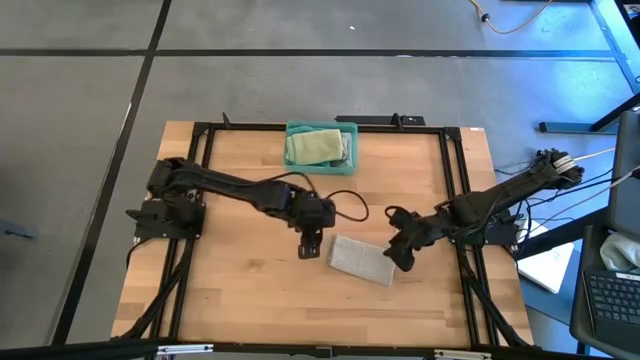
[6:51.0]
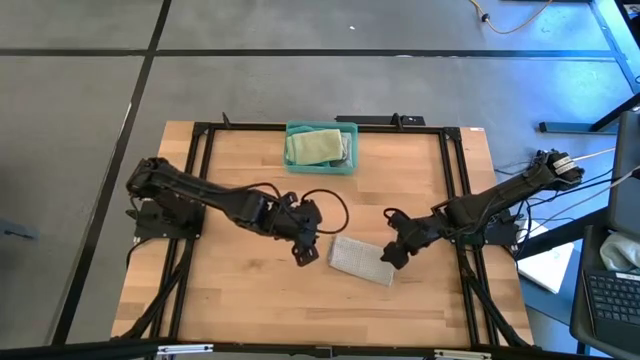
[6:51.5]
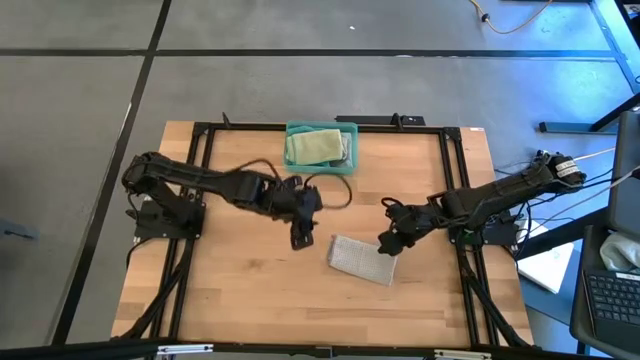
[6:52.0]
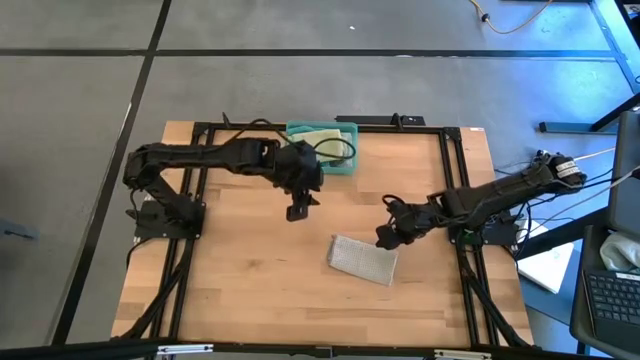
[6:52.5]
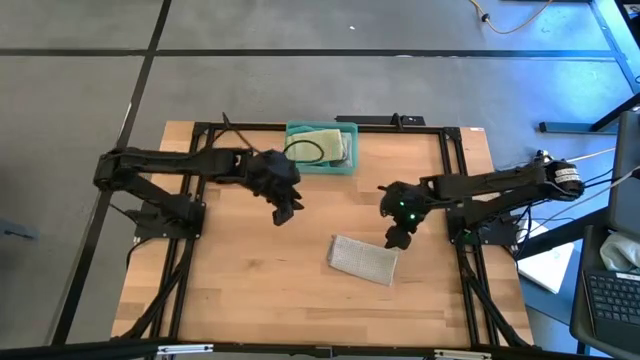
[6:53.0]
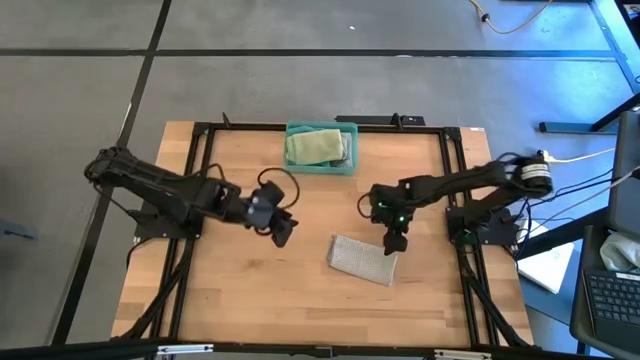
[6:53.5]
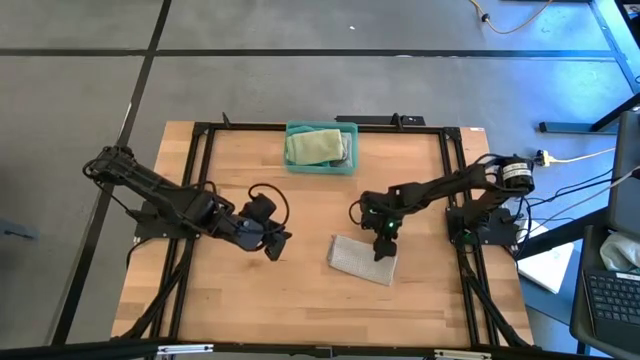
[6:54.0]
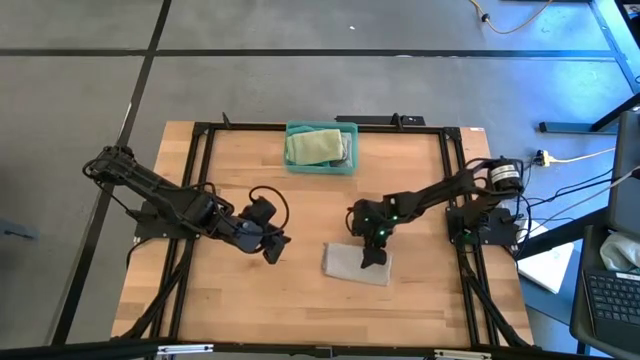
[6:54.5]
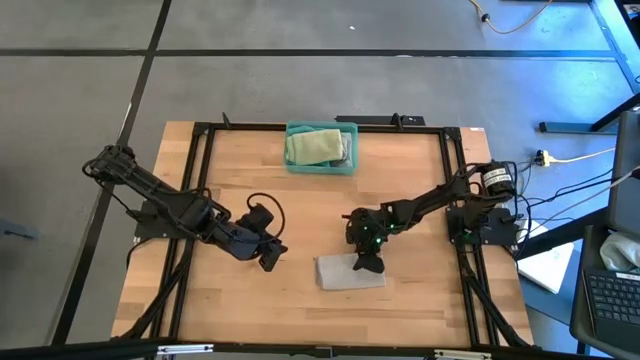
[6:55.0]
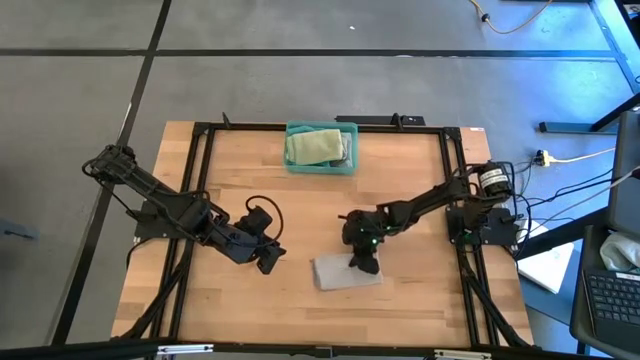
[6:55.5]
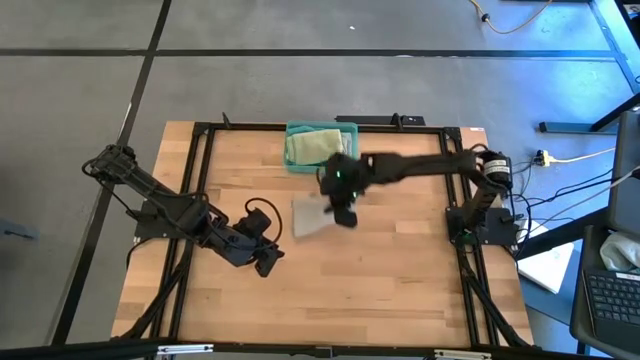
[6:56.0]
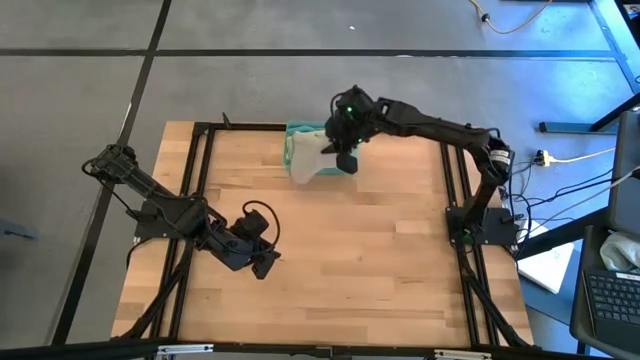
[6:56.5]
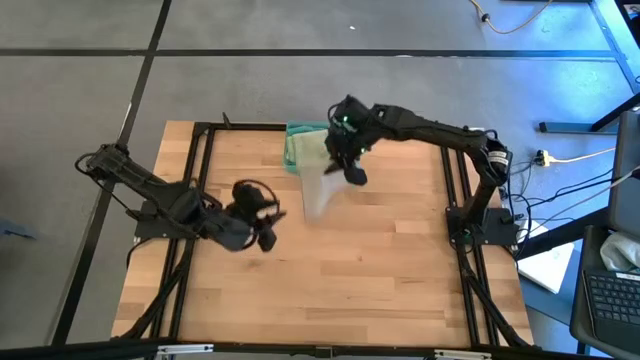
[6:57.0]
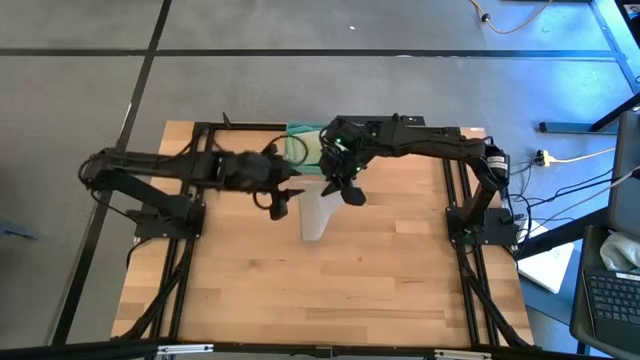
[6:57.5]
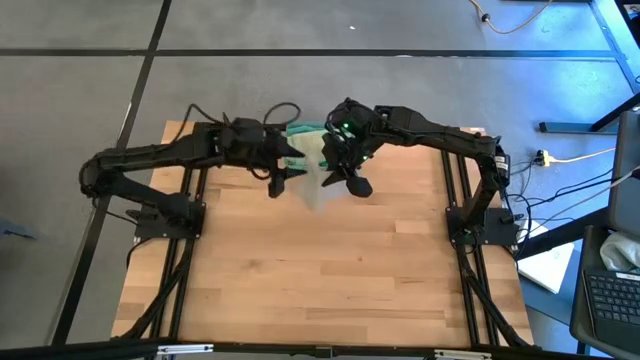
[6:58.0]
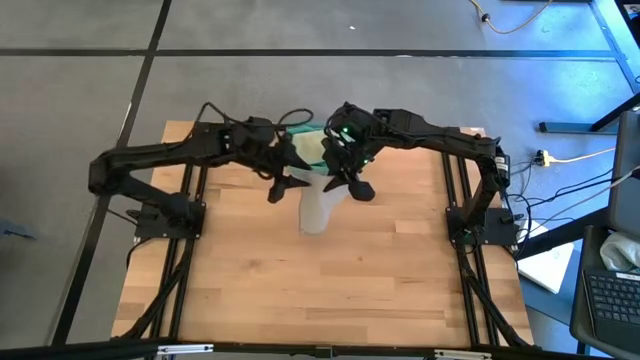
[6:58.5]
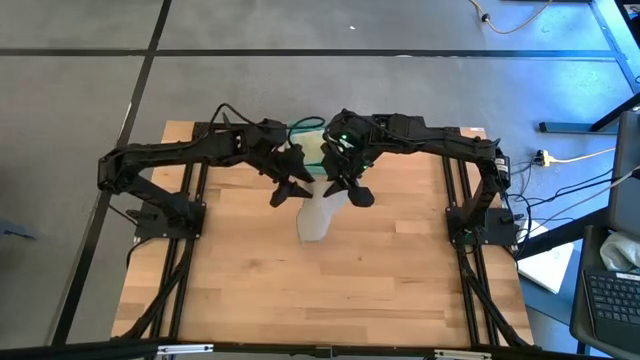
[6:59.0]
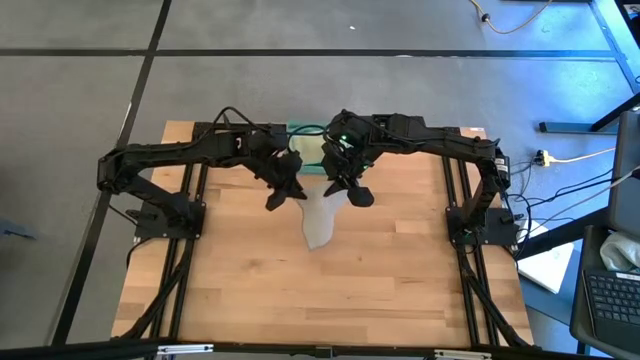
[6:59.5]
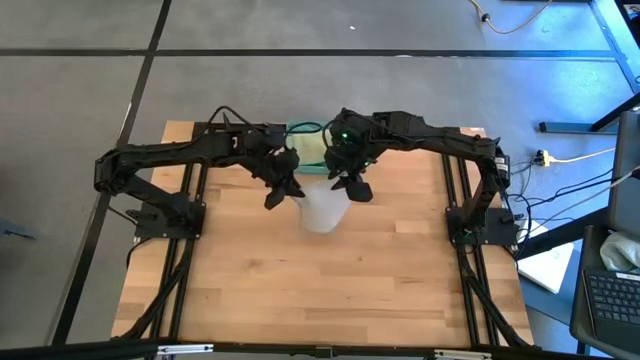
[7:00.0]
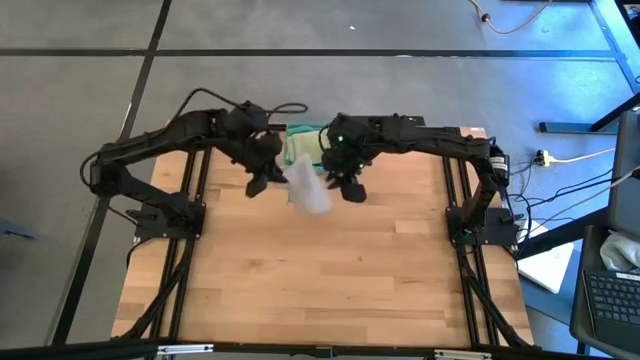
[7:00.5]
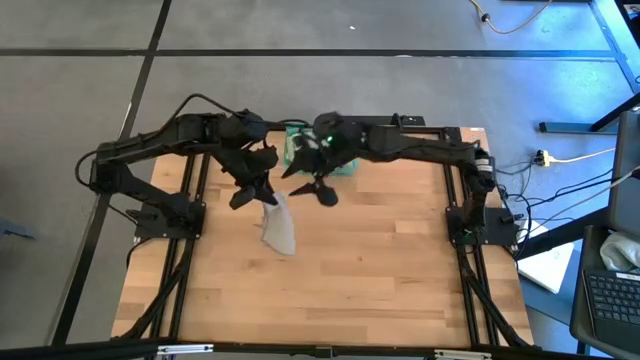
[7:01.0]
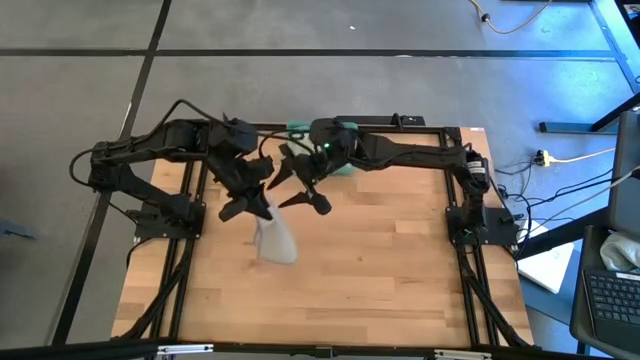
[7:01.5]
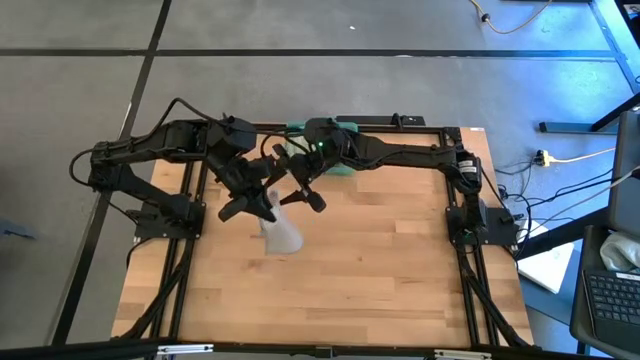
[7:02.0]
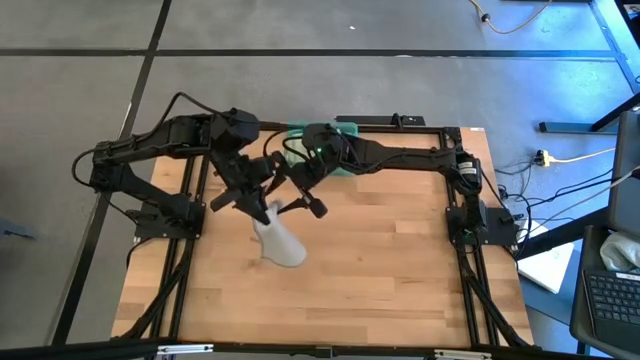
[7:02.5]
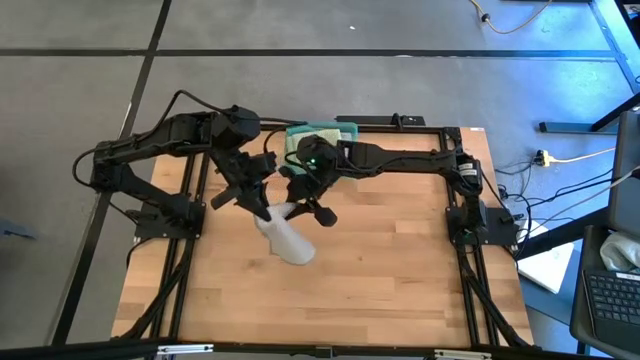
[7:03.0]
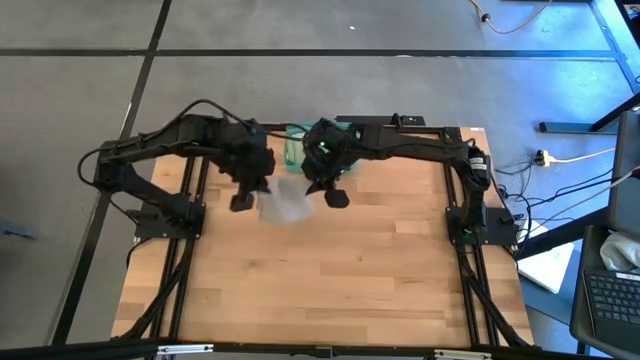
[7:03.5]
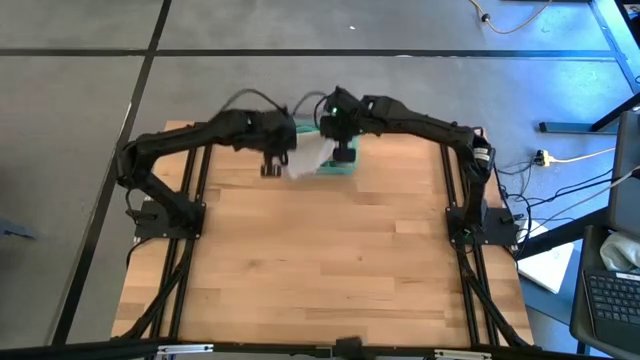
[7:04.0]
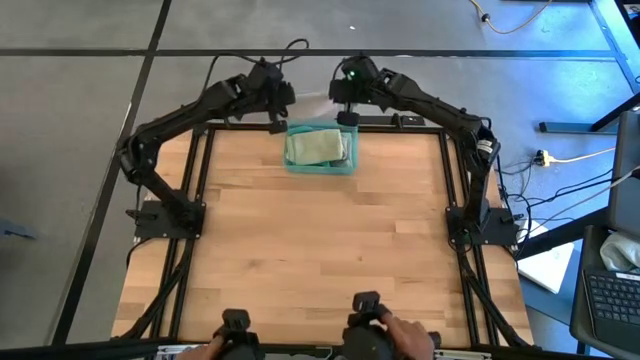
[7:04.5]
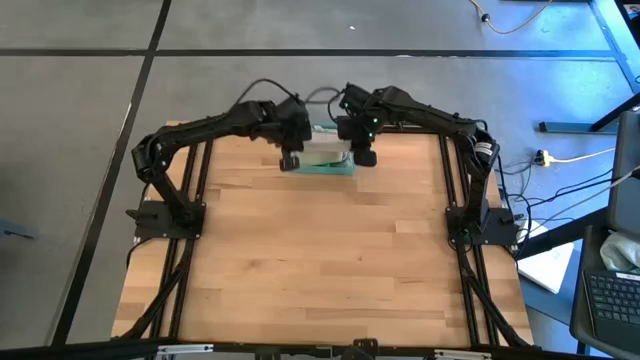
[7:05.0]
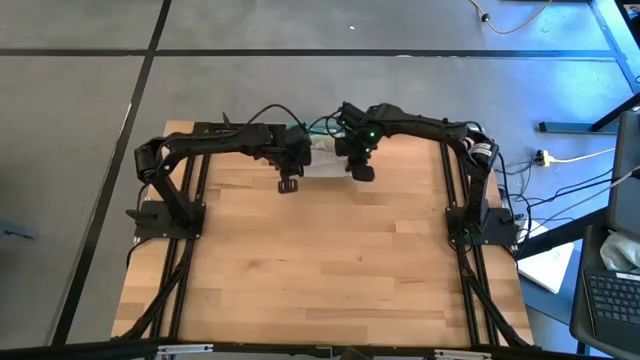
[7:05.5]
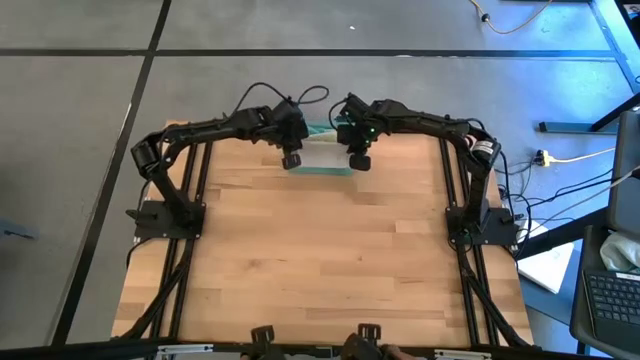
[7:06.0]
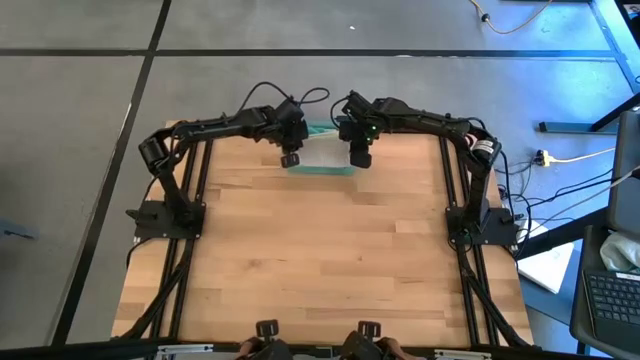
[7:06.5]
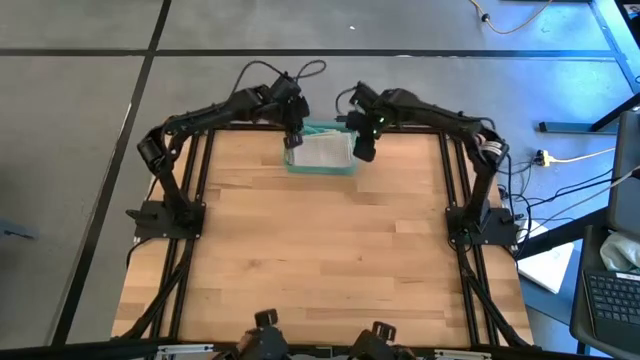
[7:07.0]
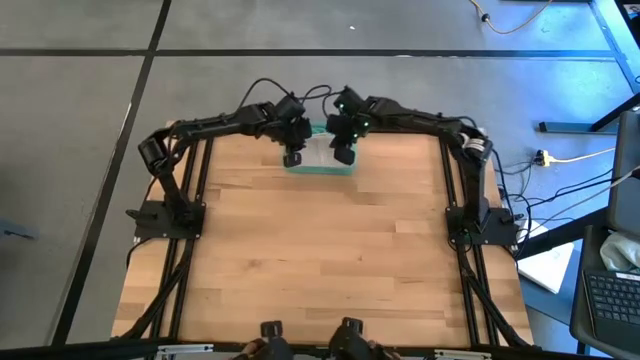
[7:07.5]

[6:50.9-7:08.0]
Task: Fold microfiber towels
Put the folded gray towel into the bin

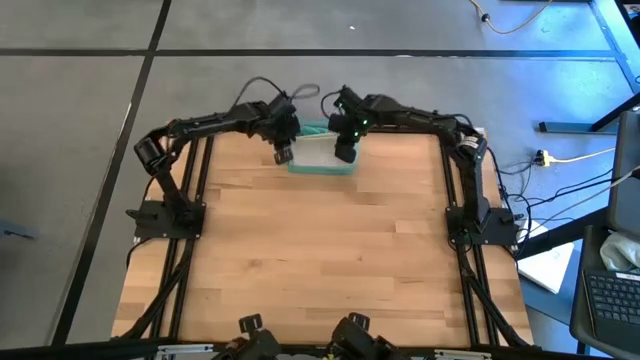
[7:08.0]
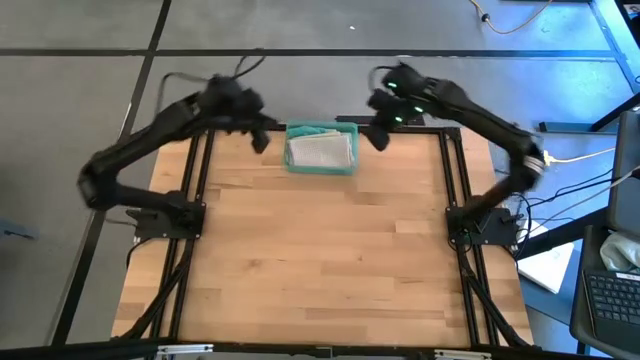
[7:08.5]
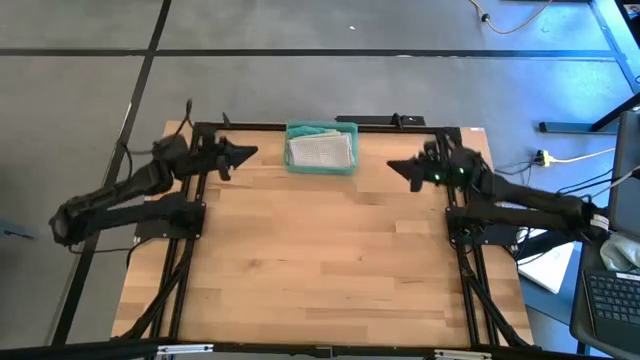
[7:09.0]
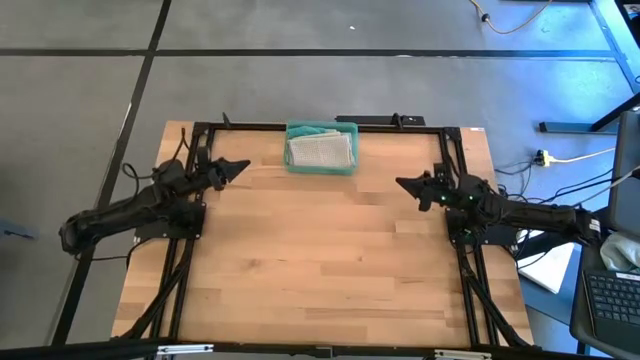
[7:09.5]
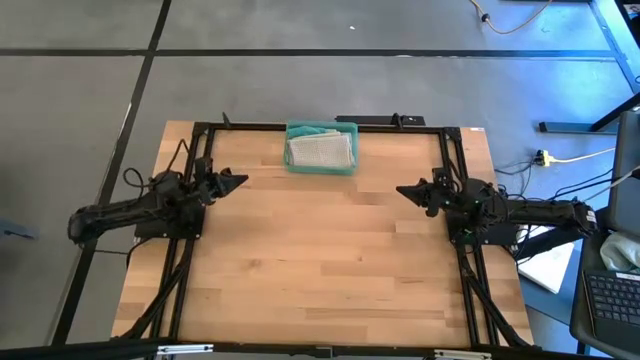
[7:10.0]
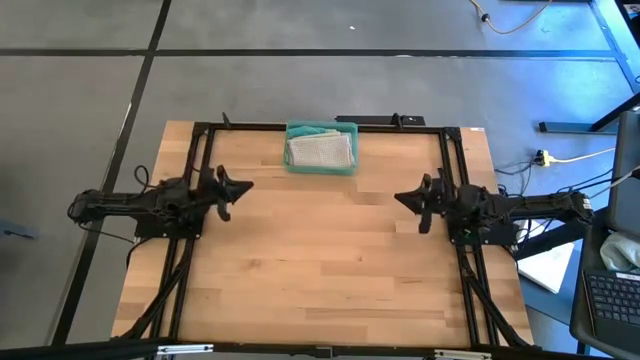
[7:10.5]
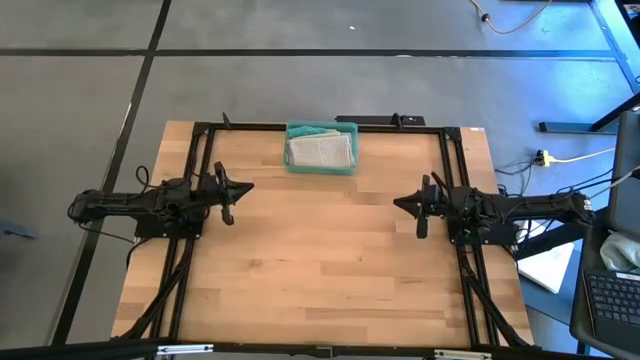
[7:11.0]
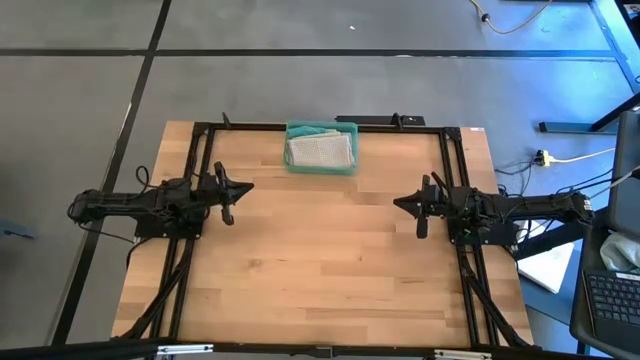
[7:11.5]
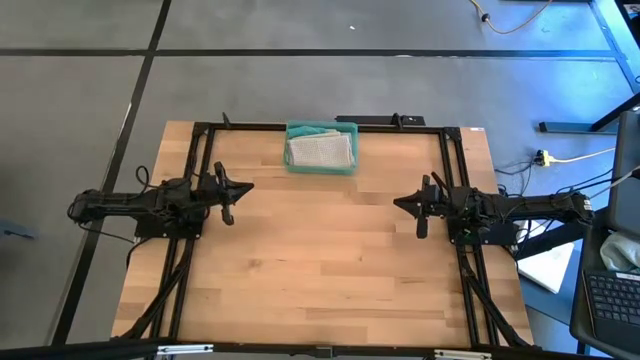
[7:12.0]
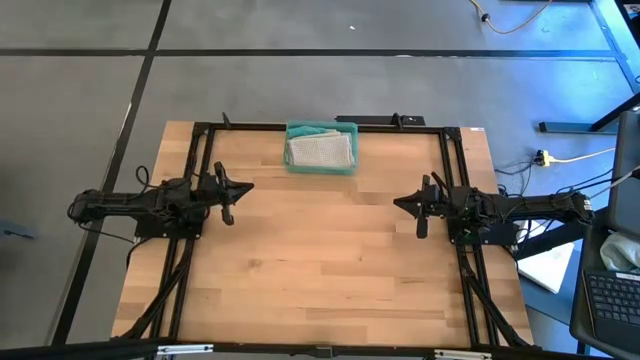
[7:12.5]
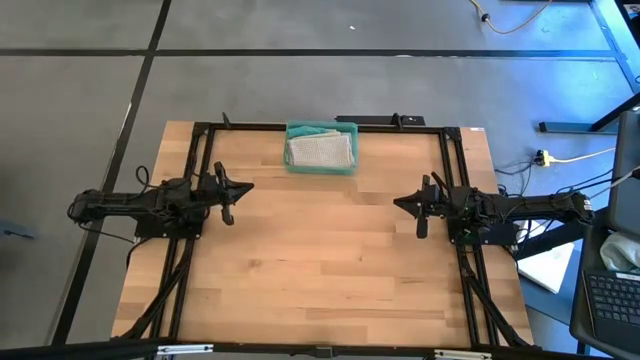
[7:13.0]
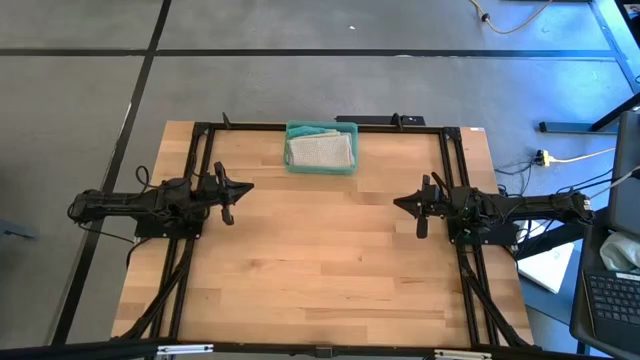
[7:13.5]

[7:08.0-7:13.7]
Return to Home Position
